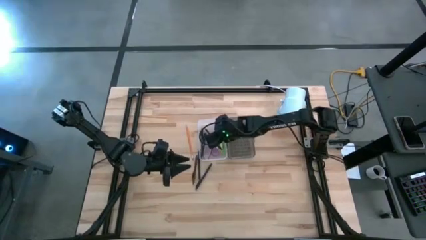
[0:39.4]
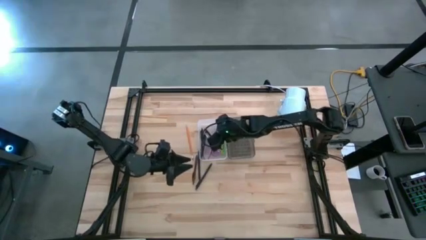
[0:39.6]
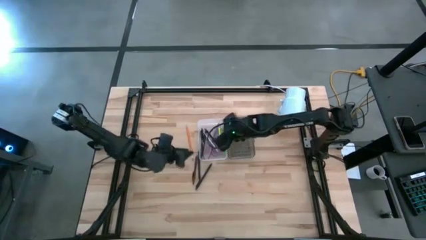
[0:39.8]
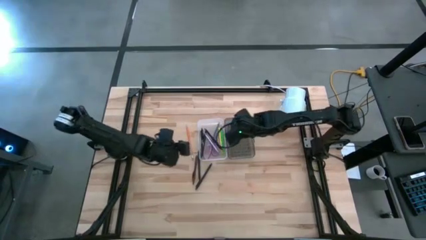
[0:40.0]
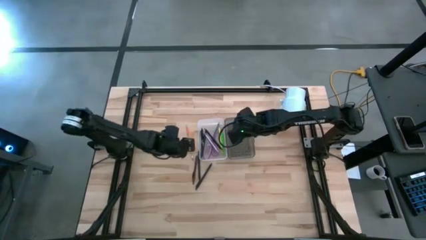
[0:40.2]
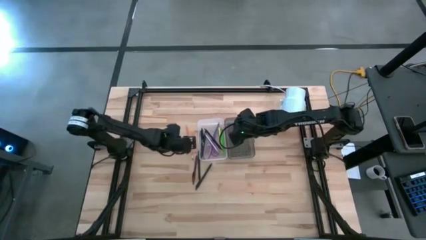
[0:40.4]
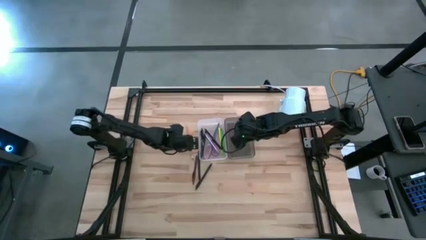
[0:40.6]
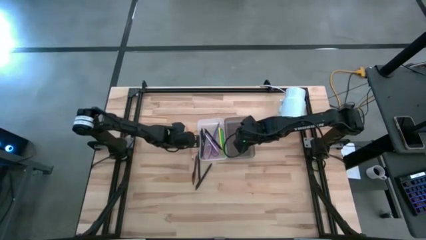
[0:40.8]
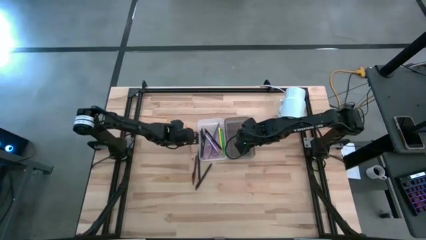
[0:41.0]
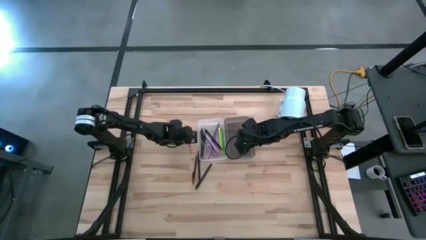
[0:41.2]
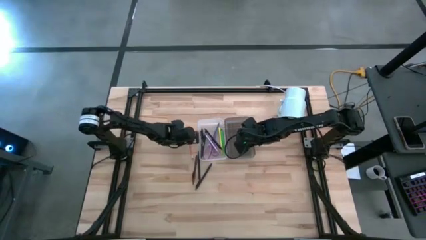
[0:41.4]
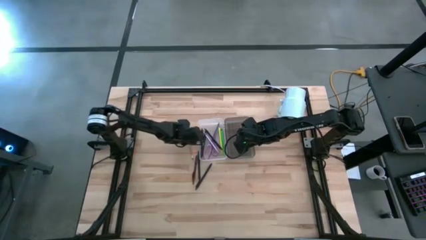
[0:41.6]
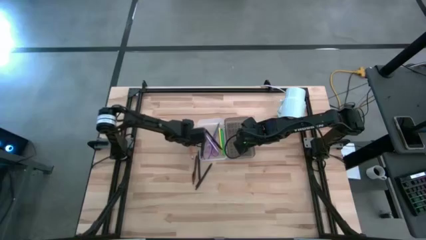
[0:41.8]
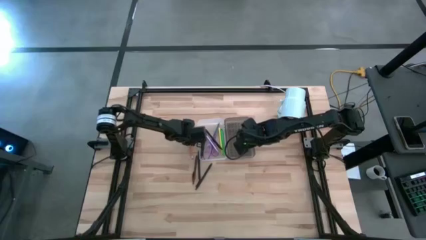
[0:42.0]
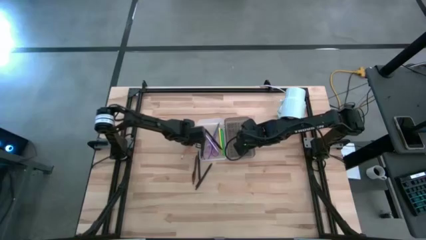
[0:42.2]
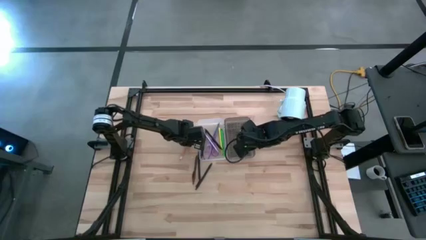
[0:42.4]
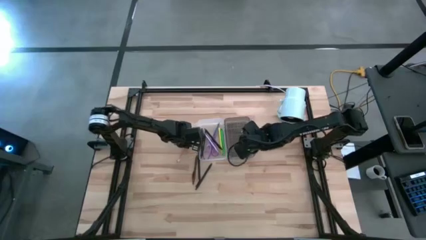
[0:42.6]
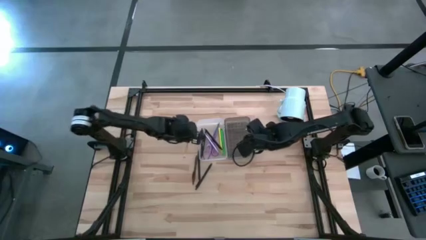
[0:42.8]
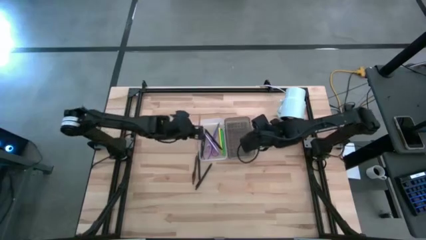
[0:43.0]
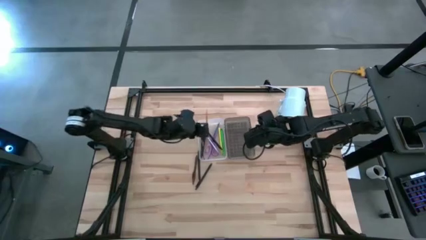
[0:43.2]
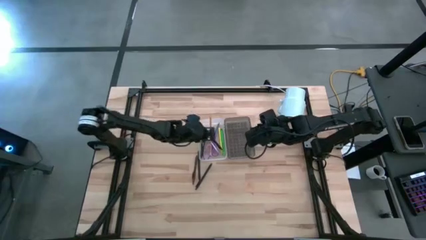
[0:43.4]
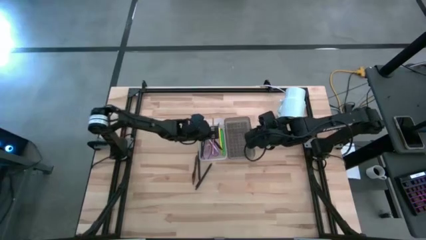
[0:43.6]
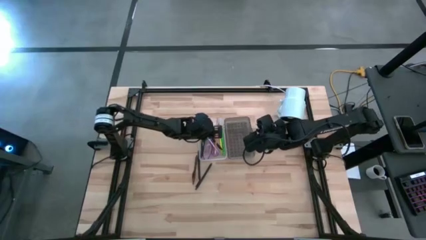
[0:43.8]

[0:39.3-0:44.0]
Task: Pick & place school supplies into a supply box
Put the orange pencil into the supply box

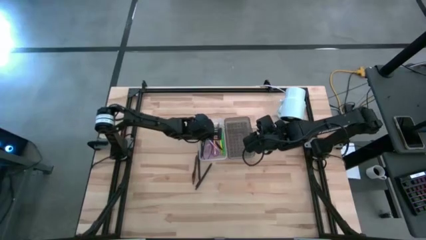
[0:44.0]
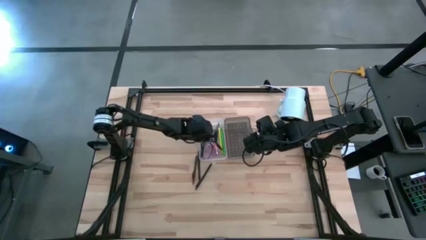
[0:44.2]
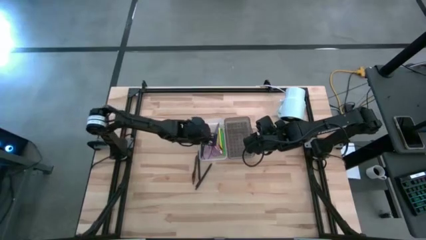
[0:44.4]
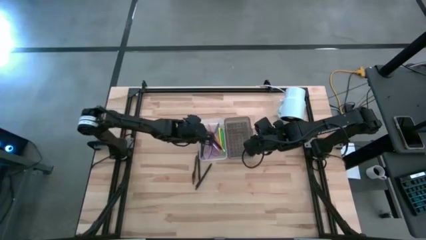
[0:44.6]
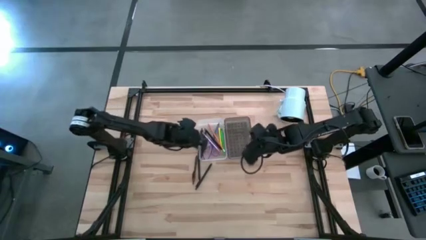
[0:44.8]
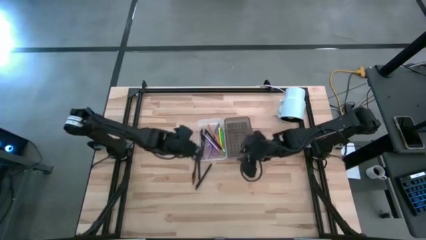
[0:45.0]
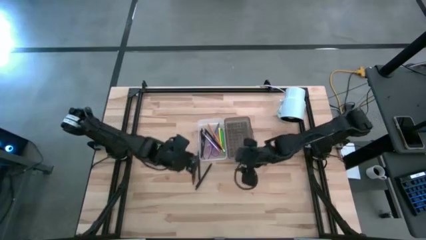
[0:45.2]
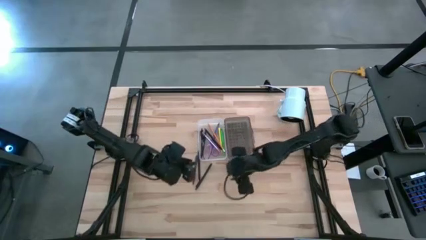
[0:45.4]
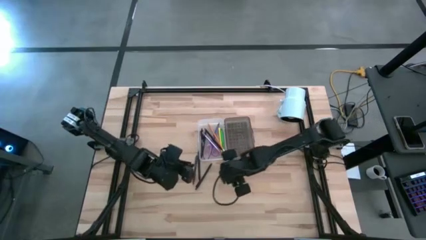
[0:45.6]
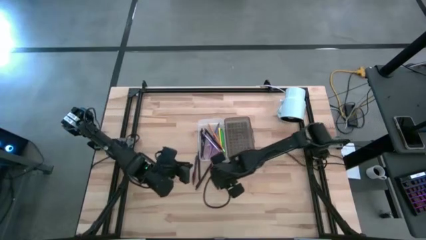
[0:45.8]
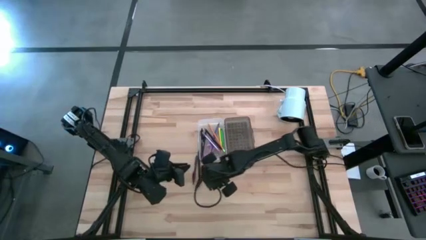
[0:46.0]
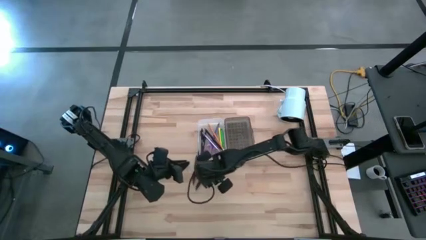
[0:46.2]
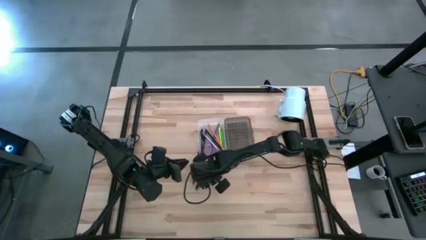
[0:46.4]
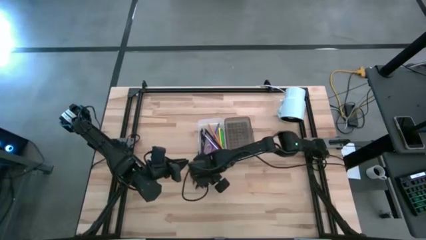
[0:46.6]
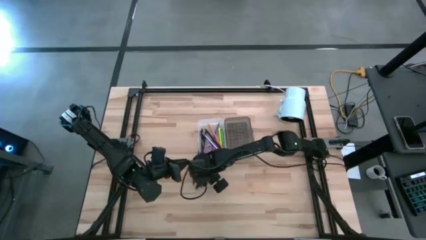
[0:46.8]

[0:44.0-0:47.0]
Put the black pen into the supply box

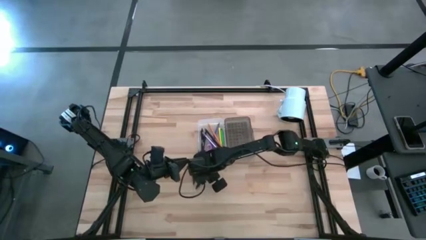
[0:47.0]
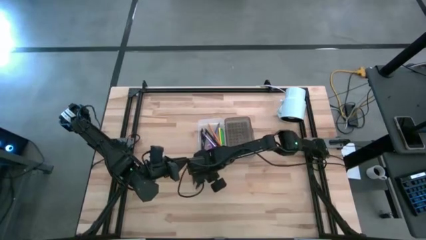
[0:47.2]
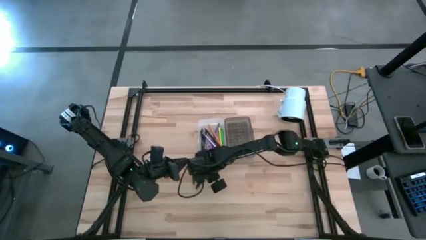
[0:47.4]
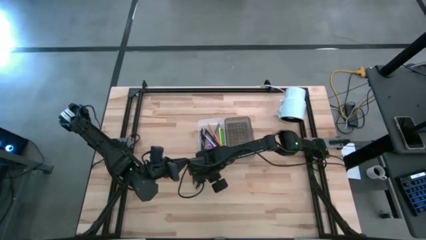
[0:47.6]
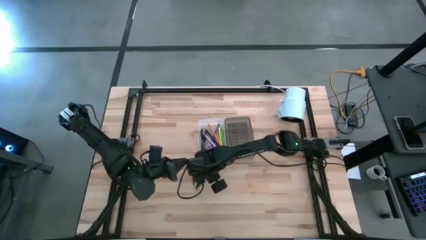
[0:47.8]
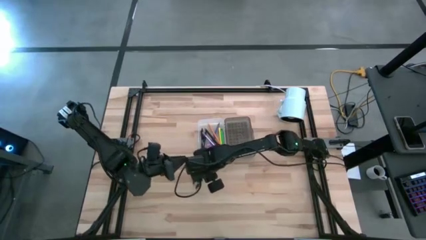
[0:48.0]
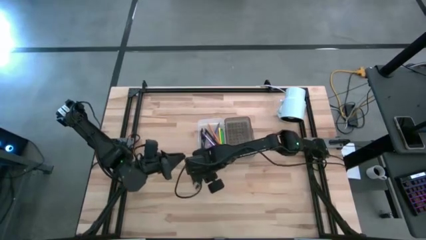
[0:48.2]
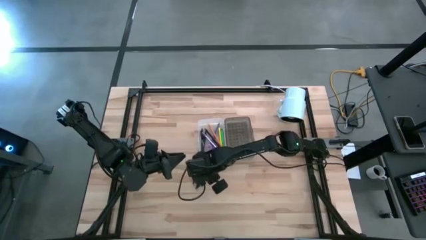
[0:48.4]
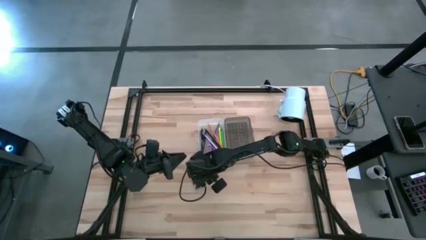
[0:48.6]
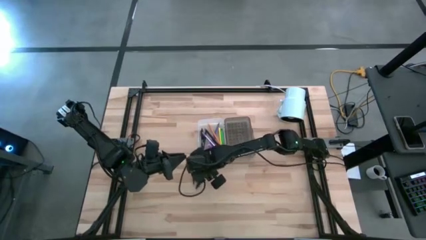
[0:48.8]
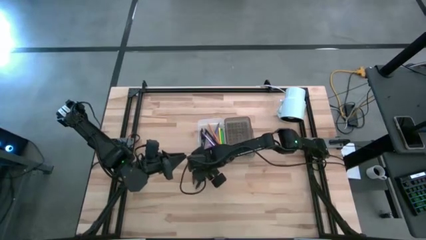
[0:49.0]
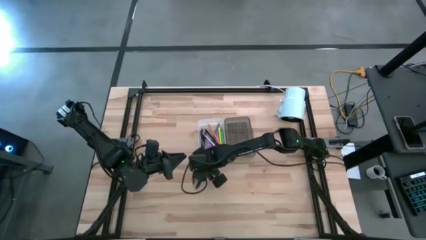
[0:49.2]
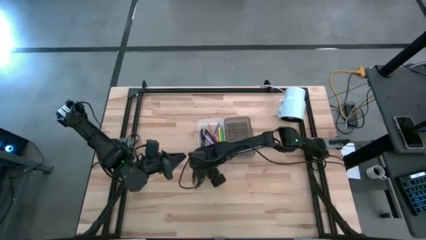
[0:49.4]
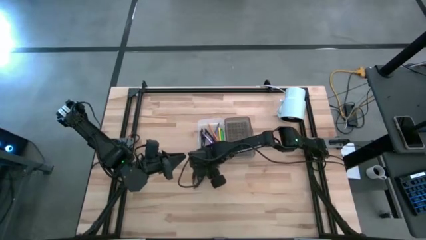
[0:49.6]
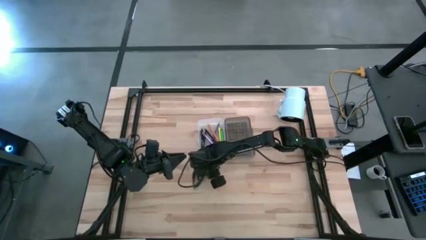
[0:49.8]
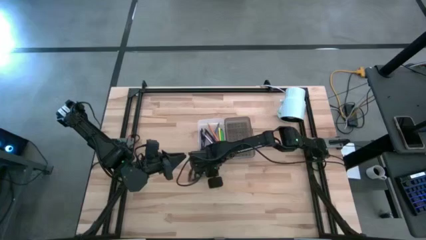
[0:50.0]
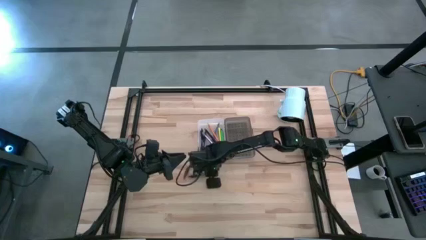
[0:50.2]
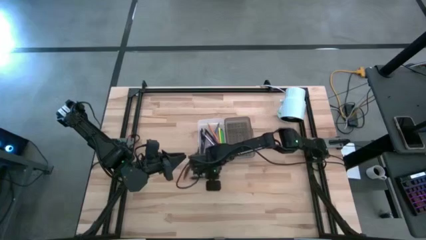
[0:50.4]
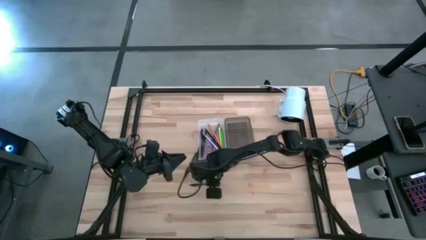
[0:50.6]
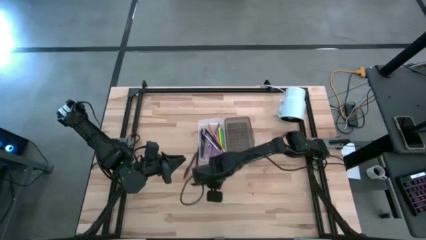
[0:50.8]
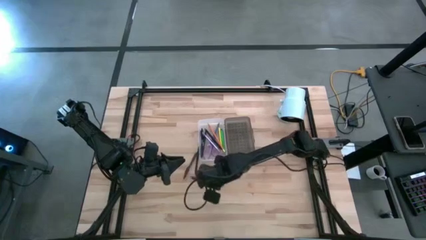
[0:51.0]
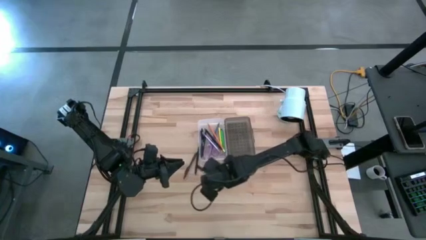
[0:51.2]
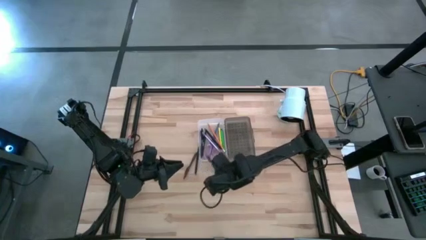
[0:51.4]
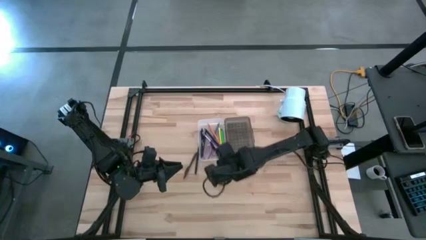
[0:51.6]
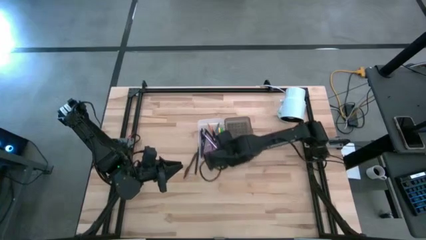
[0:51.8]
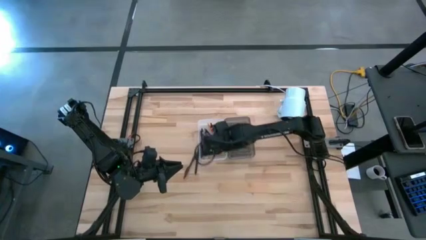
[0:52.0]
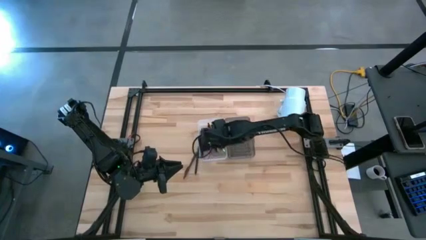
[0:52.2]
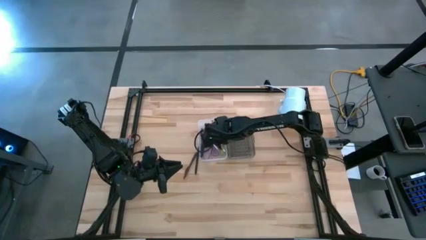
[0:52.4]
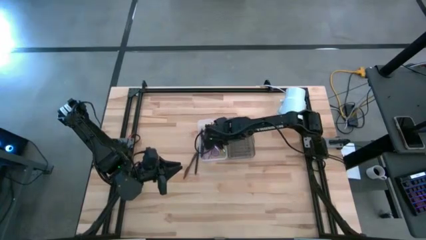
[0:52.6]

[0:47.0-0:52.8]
Put the black pen into the supply box

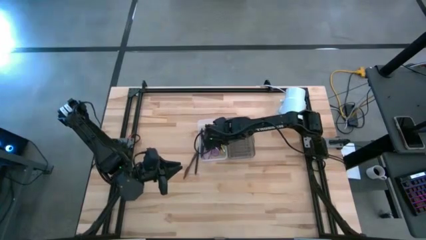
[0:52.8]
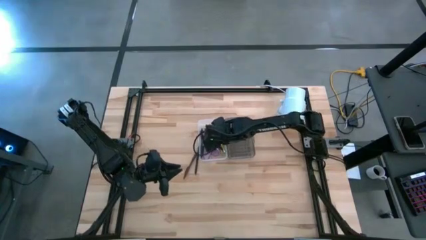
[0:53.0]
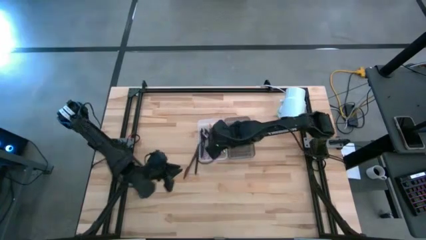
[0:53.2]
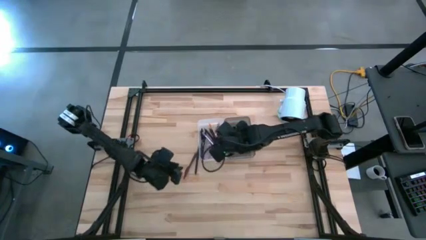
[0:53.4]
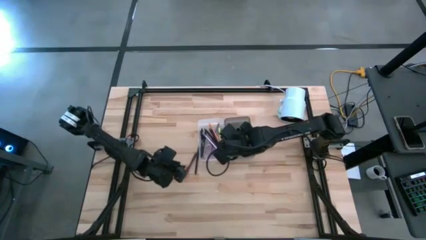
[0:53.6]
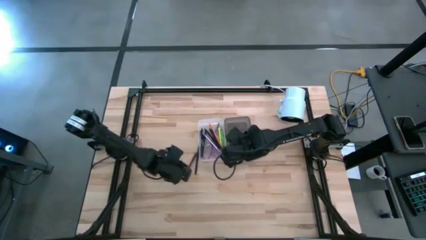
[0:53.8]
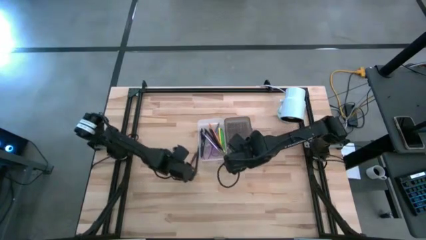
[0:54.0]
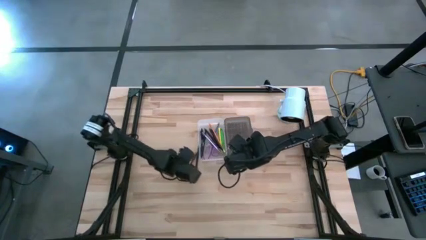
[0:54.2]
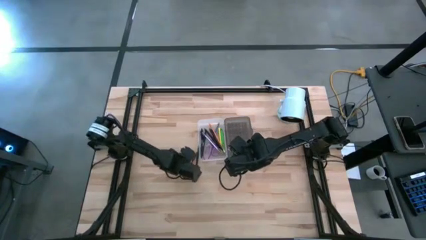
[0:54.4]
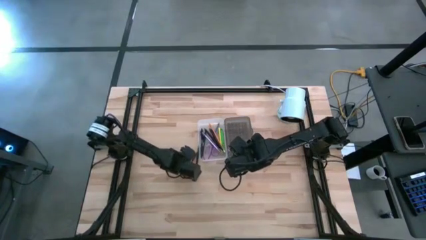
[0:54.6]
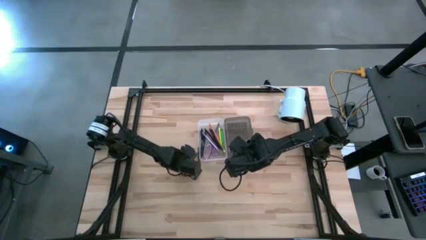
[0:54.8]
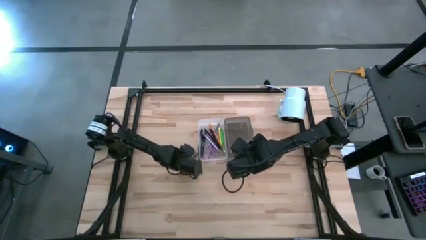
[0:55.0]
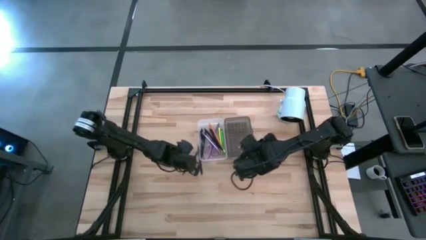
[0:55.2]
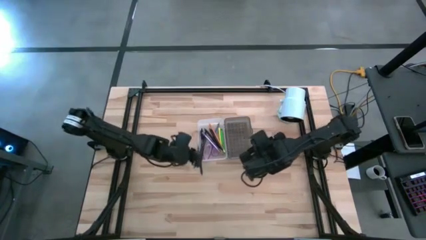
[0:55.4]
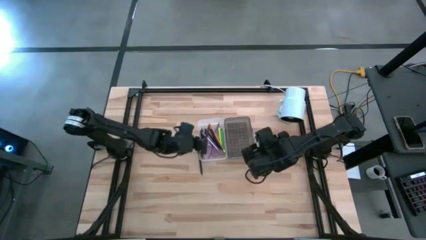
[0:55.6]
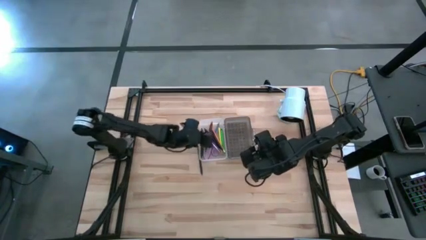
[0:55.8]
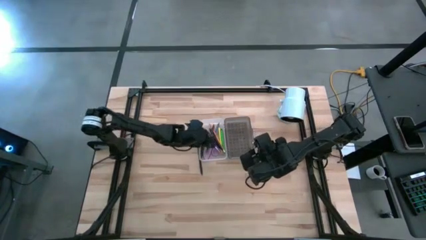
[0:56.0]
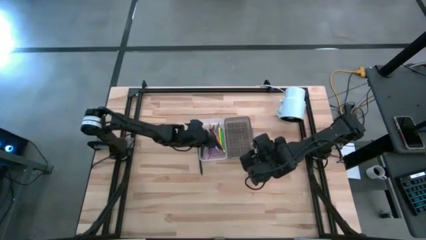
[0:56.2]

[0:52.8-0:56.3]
Put the brown pen into the supply box
